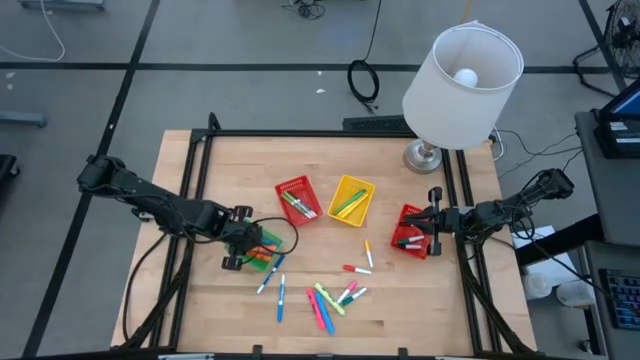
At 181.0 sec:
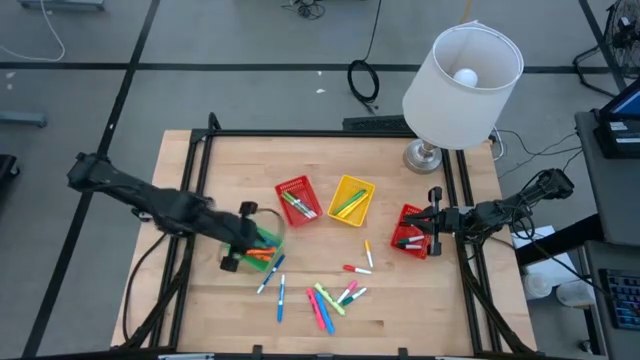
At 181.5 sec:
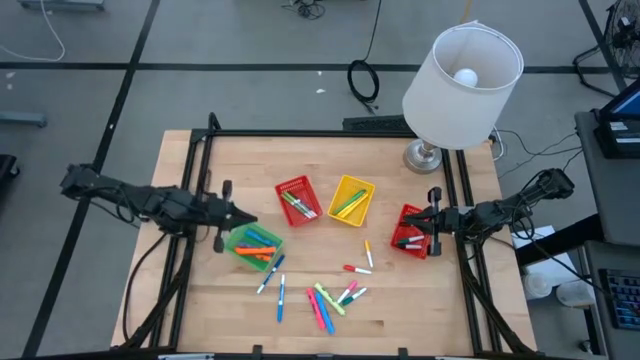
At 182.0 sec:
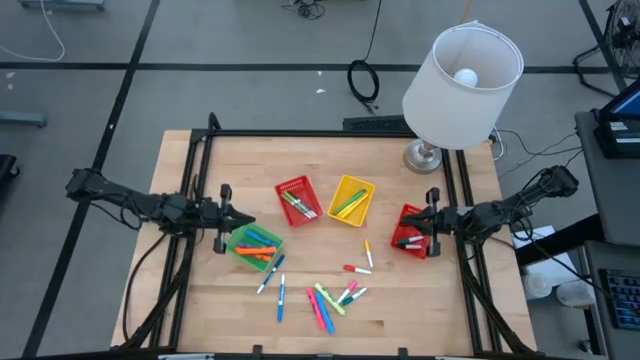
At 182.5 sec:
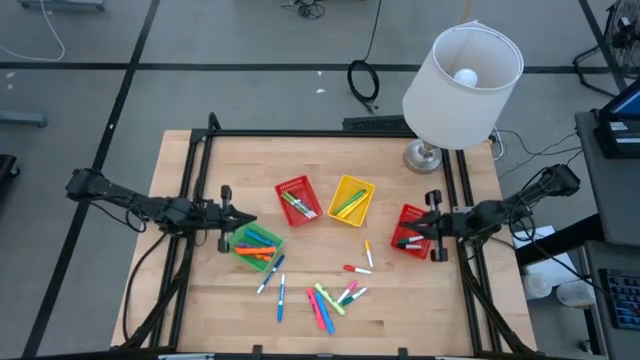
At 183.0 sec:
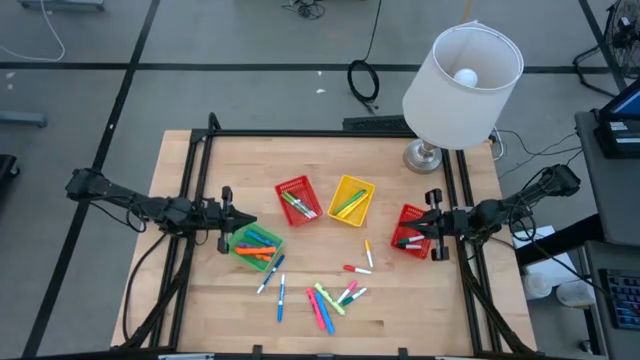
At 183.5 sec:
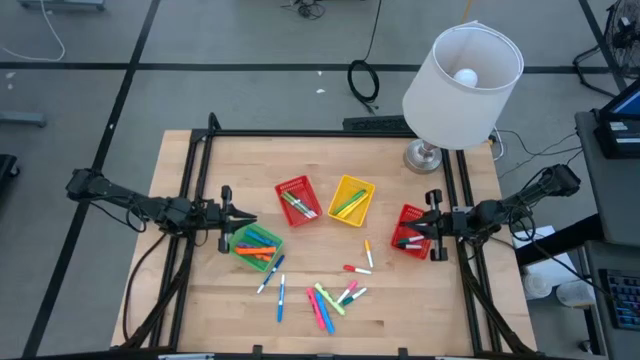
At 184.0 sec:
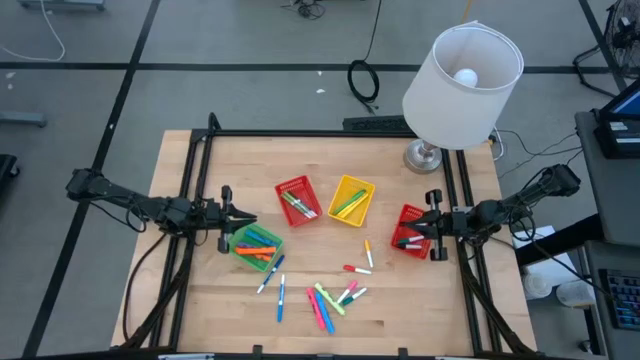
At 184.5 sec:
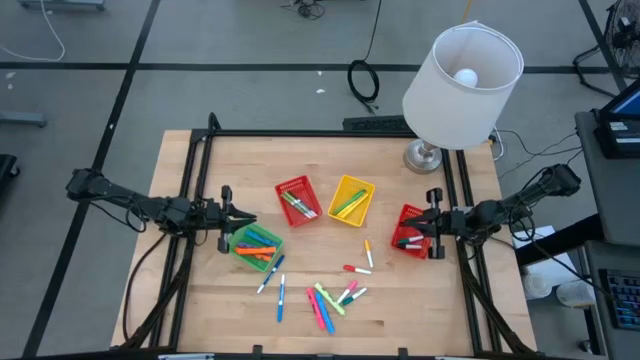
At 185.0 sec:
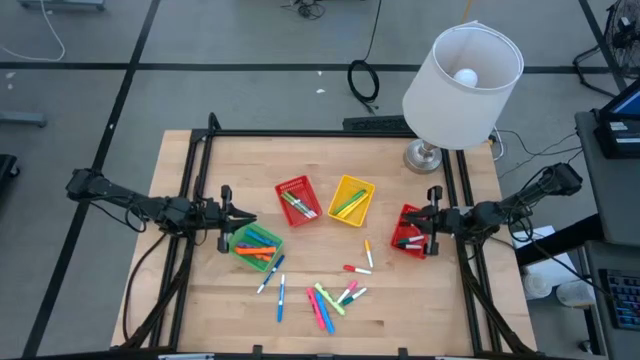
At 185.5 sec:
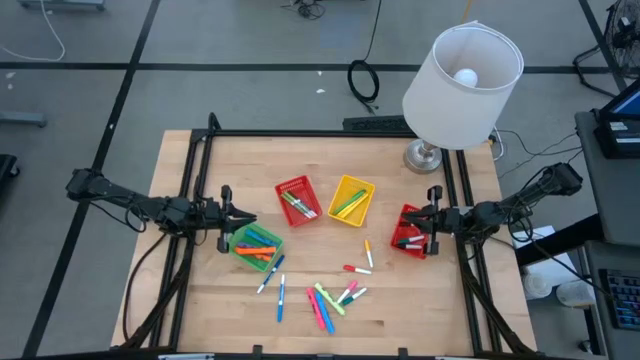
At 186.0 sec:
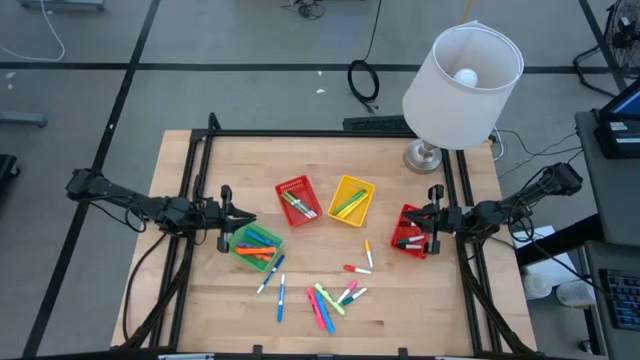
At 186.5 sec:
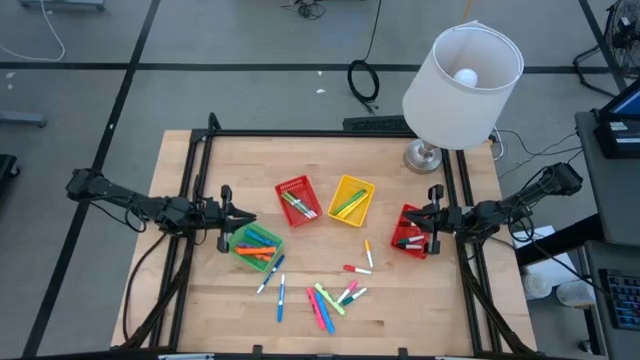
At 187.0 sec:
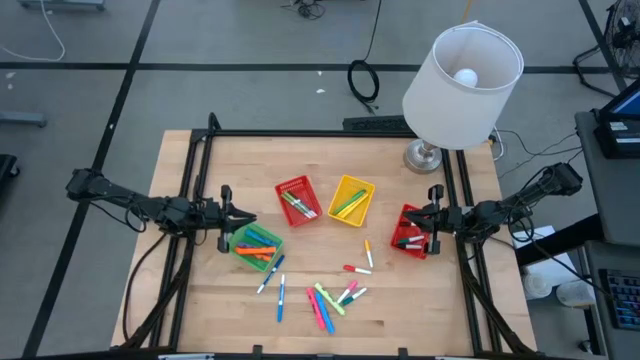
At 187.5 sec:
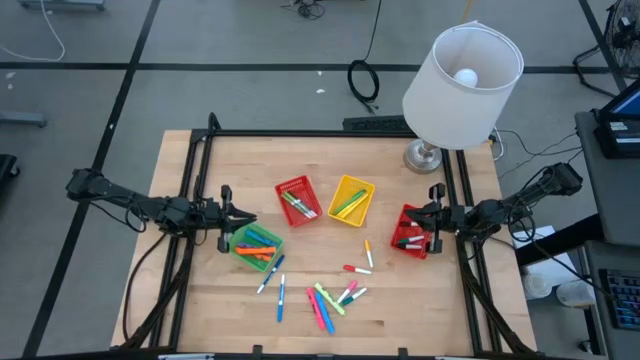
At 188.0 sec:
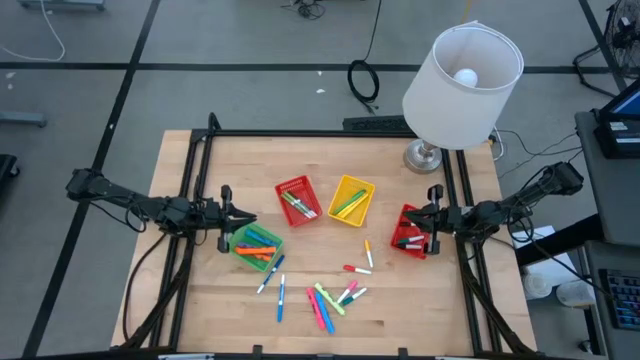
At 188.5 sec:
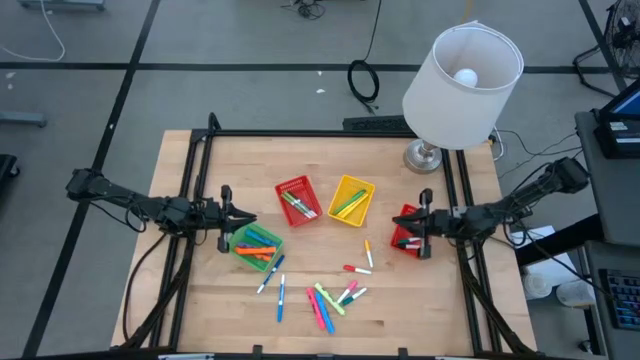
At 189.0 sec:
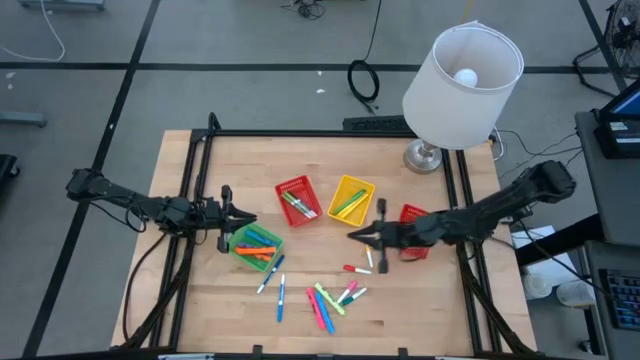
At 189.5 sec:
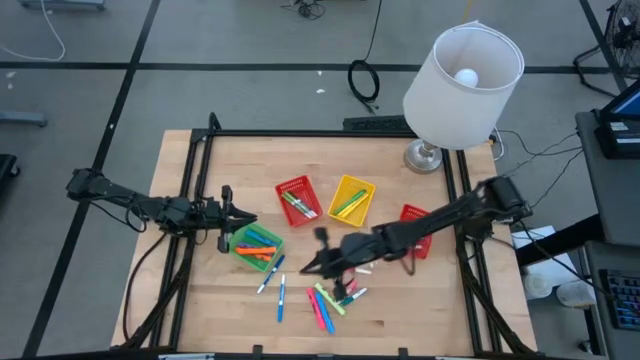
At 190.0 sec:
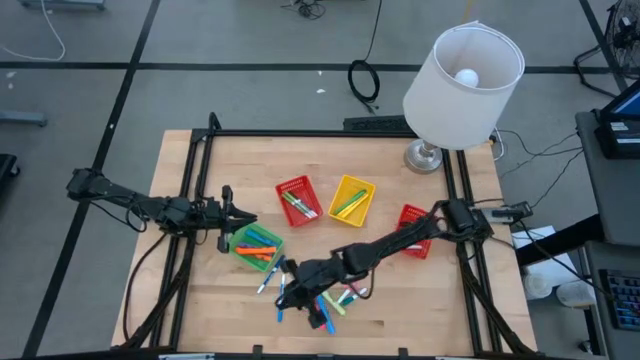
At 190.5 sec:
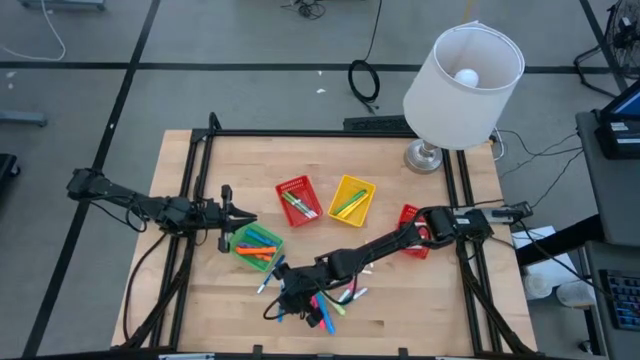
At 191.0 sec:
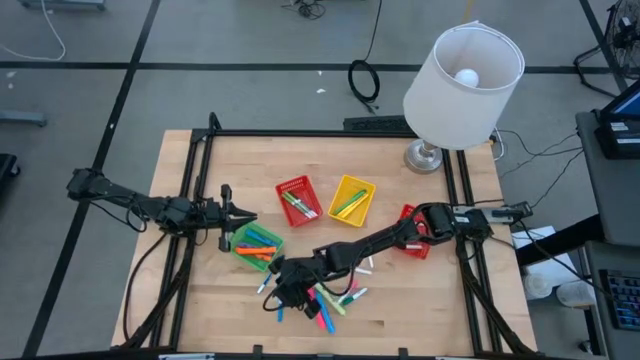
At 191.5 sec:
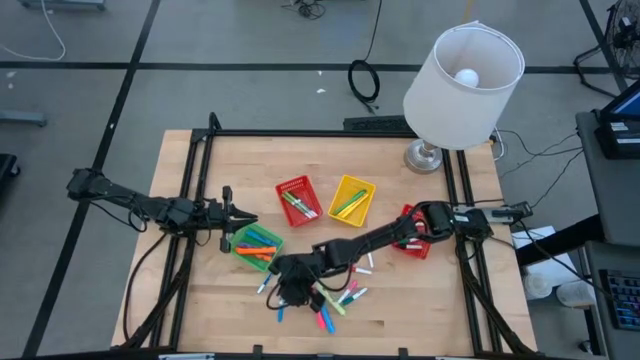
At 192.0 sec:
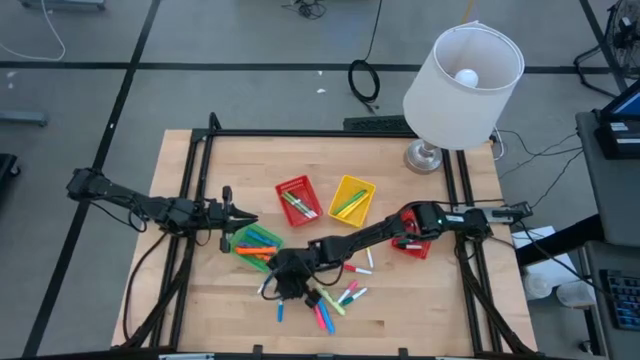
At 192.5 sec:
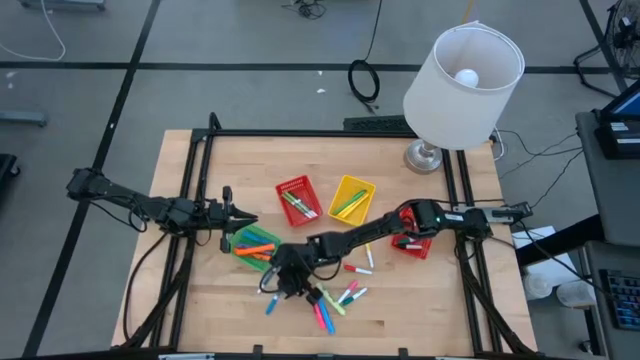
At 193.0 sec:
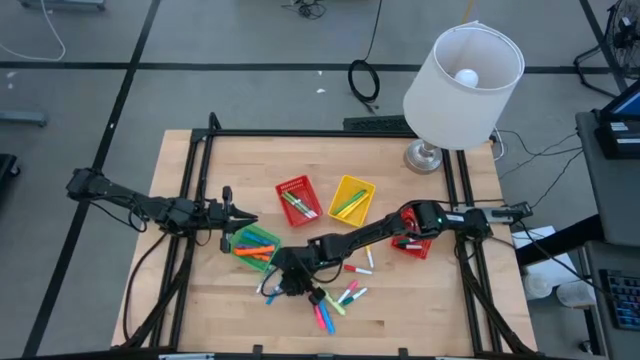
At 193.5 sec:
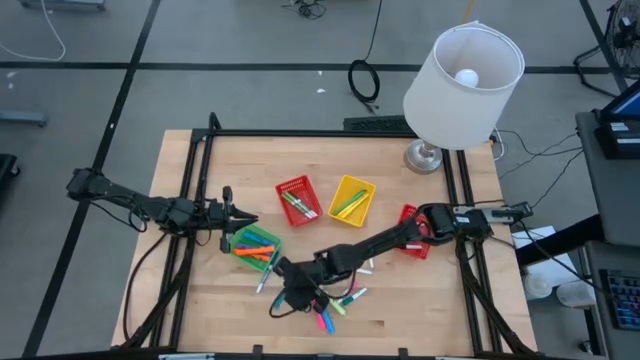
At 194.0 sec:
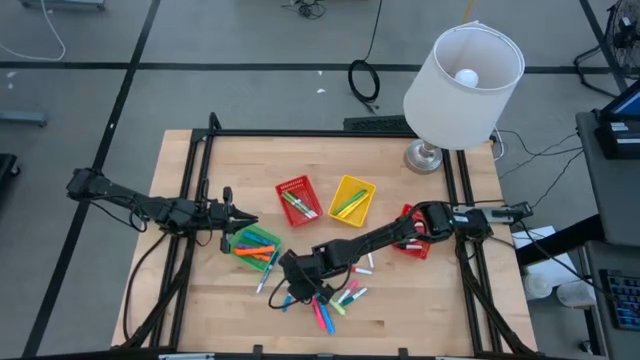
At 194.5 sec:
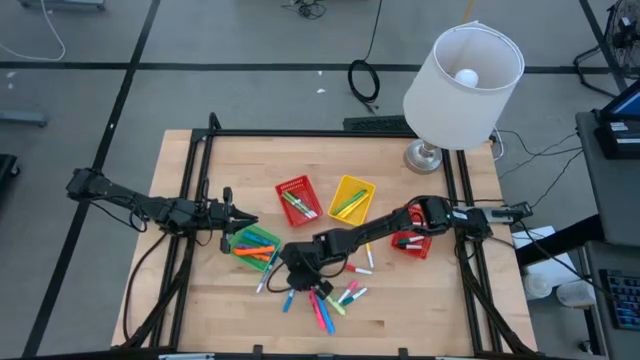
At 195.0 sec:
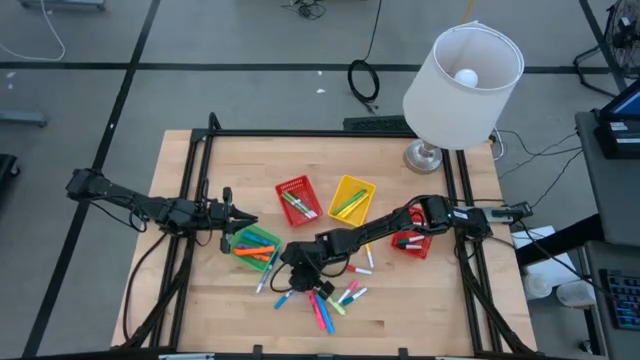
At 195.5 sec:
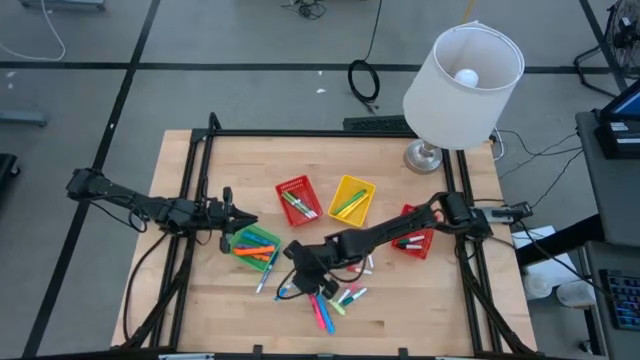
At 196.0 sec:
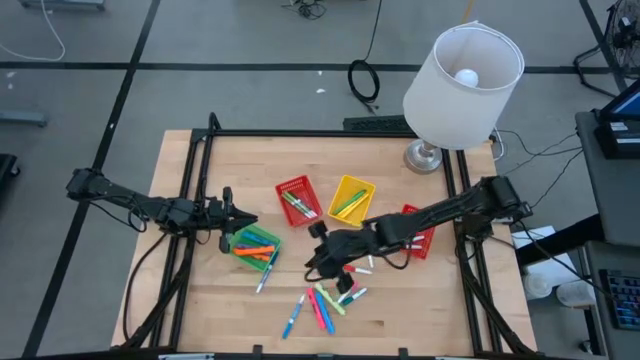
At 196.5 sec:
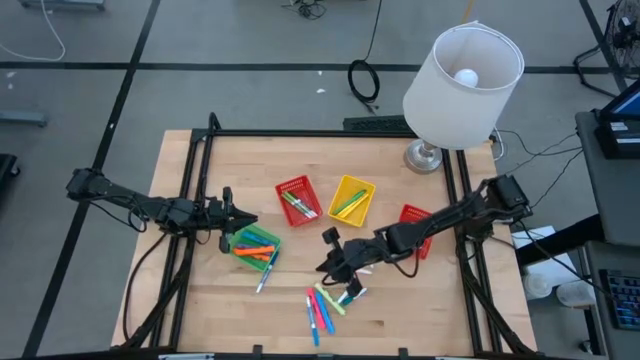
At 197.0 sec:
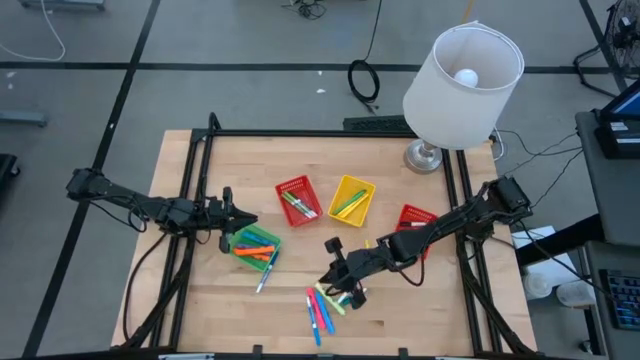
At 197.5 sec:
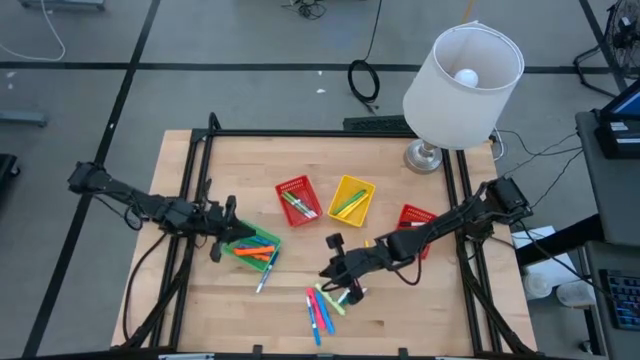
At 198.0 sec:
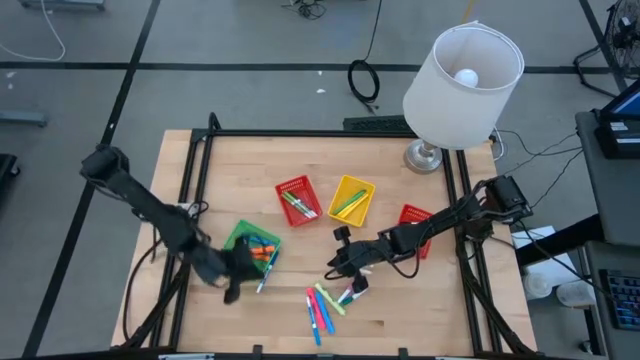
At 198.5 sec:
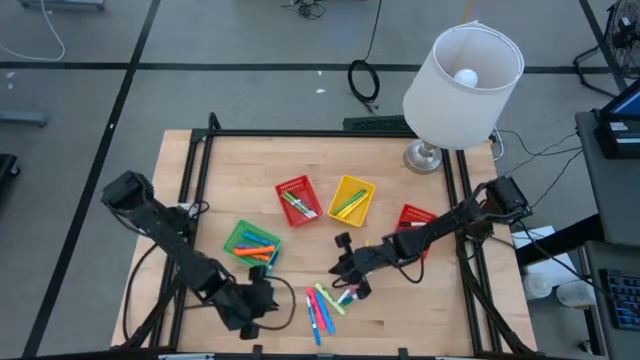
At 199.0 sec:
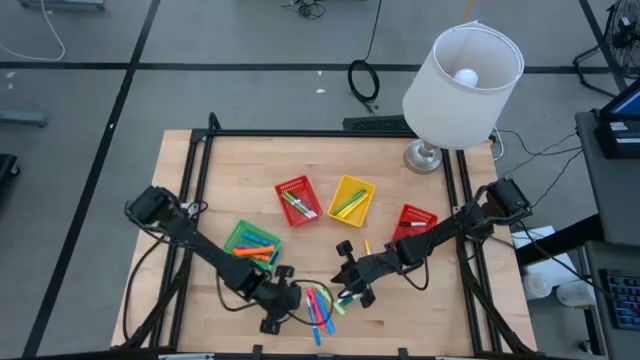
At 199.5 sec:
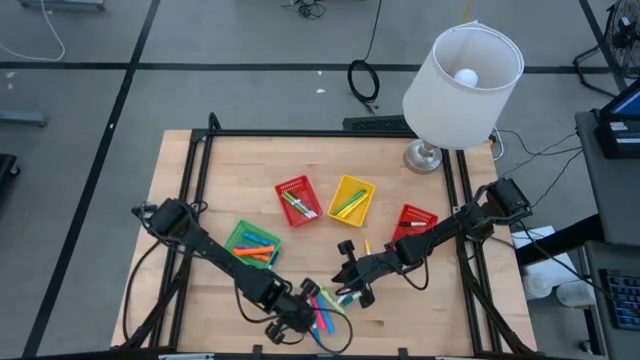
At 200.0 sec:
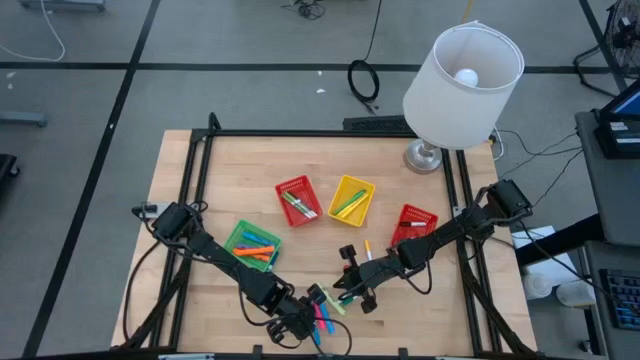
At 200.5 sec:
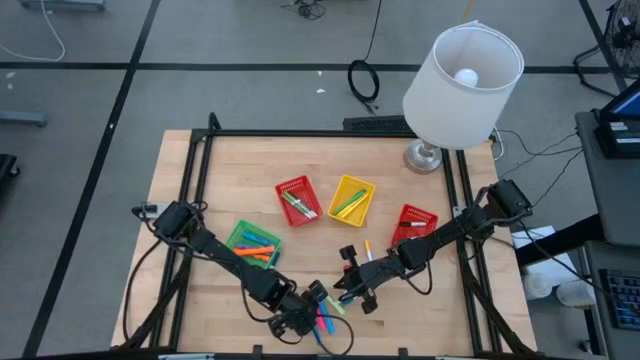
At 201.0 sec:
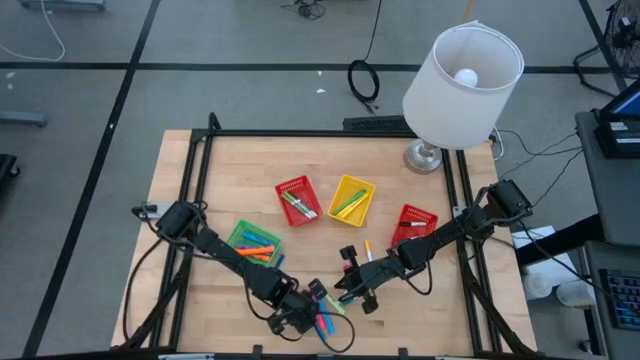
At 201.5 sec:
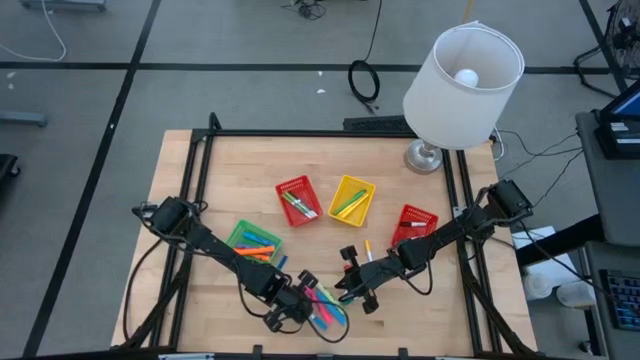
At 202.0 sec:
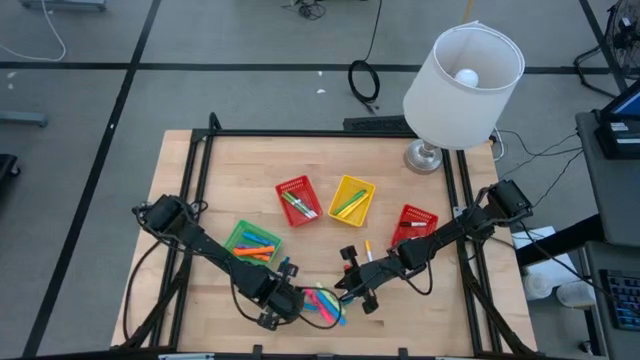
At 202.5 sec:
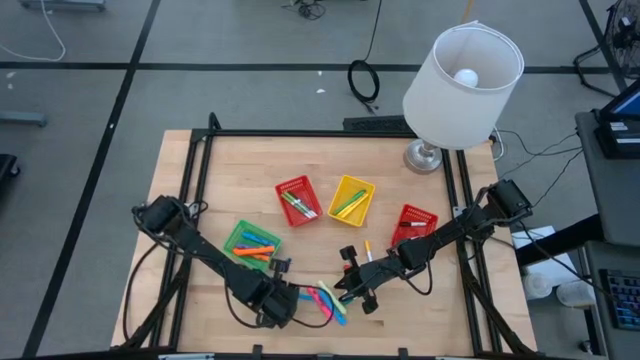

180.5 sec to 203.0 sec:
Task: Pick & Place Markers
Put the light blue marker into the left red bin
